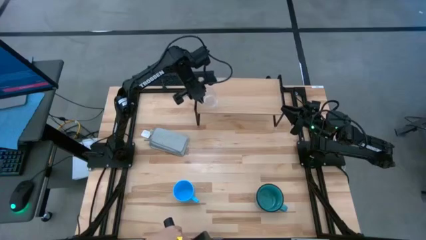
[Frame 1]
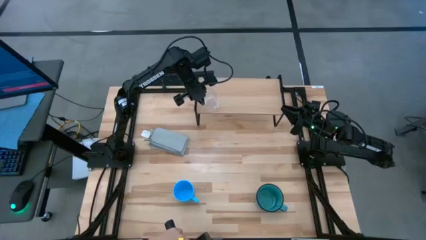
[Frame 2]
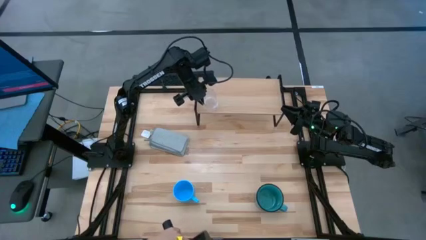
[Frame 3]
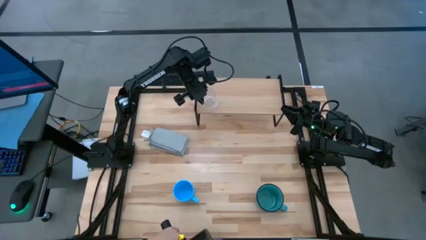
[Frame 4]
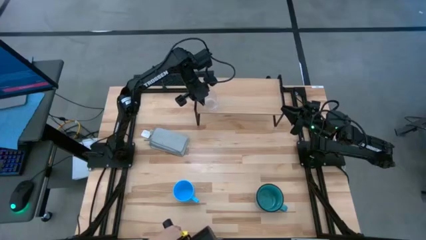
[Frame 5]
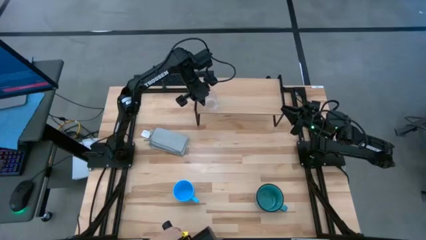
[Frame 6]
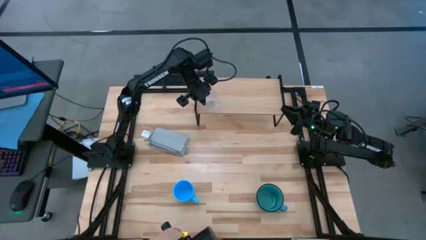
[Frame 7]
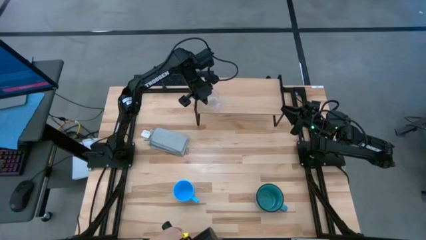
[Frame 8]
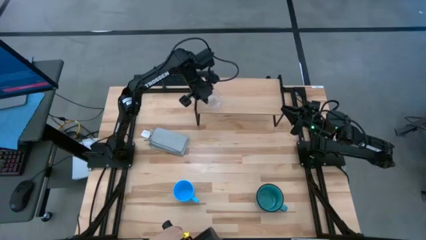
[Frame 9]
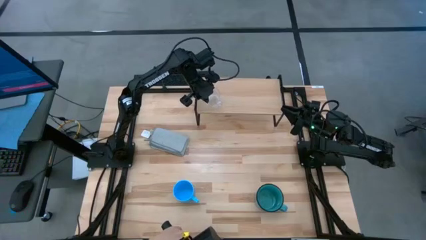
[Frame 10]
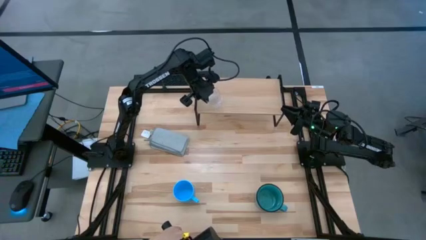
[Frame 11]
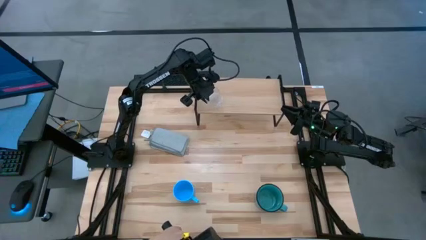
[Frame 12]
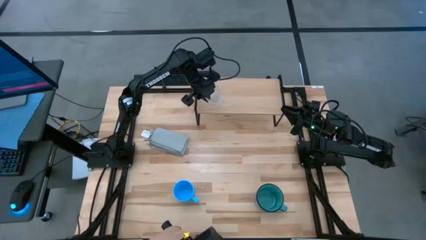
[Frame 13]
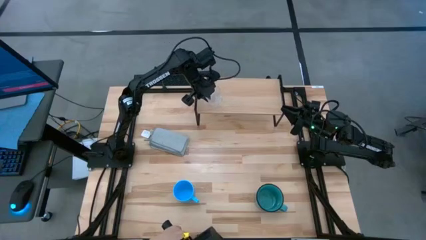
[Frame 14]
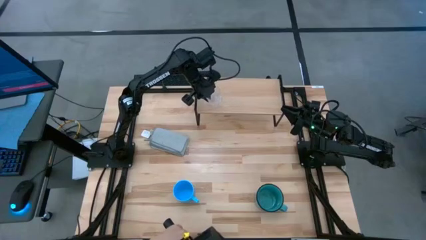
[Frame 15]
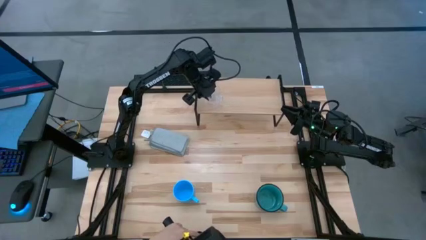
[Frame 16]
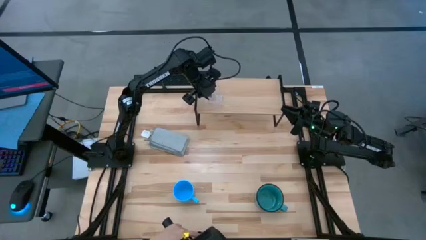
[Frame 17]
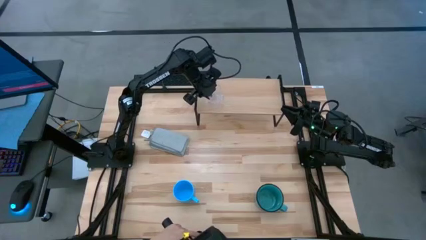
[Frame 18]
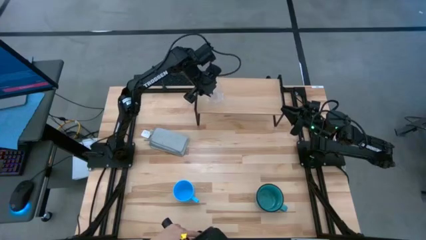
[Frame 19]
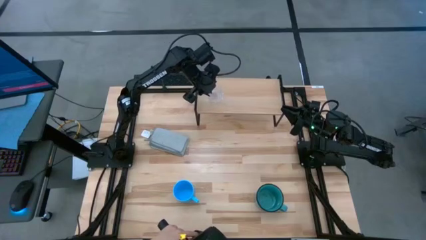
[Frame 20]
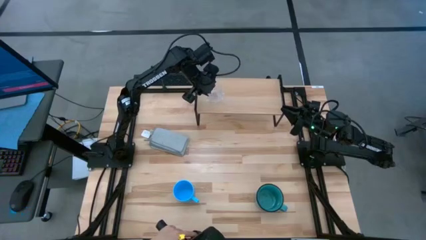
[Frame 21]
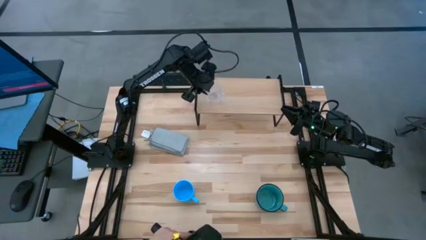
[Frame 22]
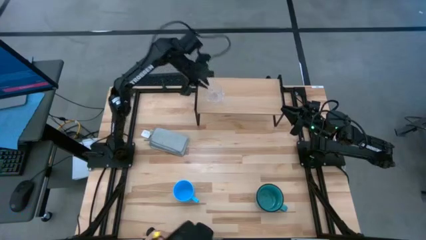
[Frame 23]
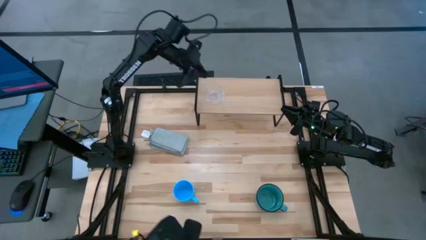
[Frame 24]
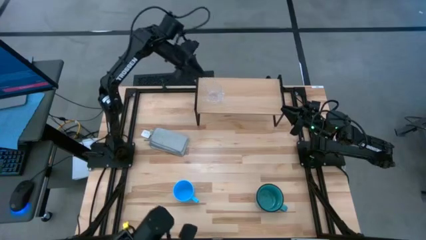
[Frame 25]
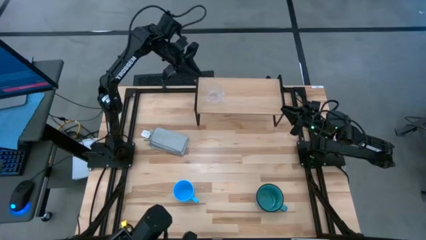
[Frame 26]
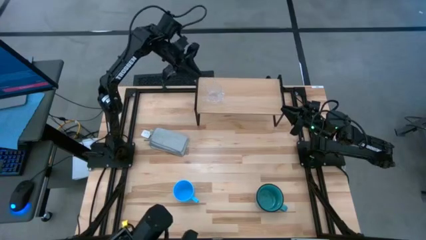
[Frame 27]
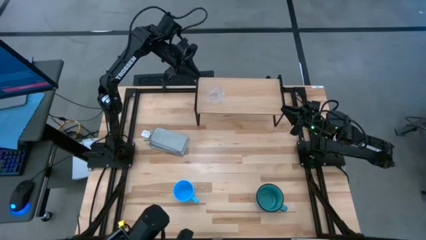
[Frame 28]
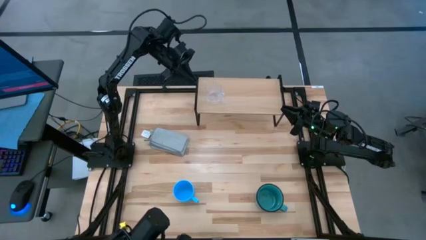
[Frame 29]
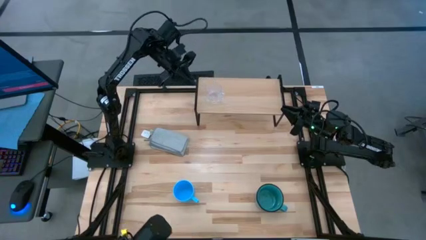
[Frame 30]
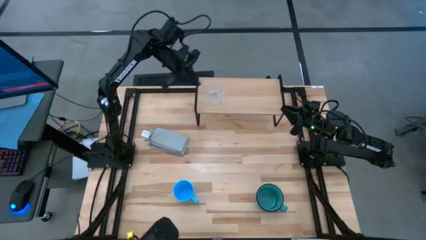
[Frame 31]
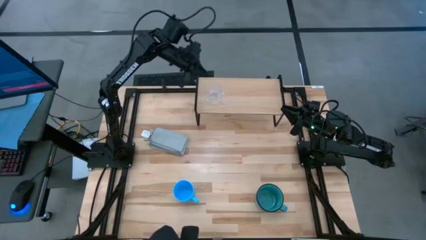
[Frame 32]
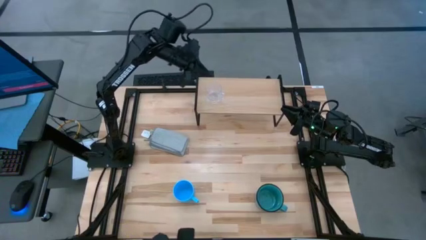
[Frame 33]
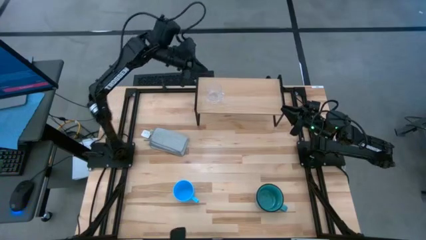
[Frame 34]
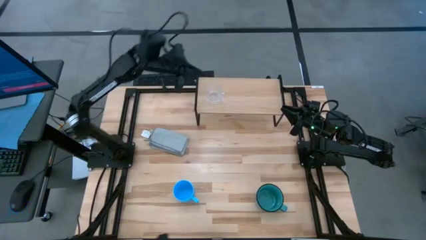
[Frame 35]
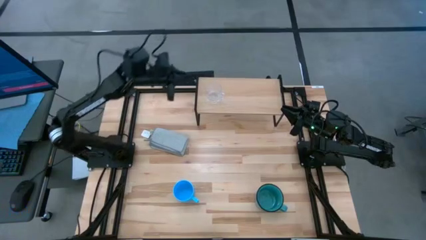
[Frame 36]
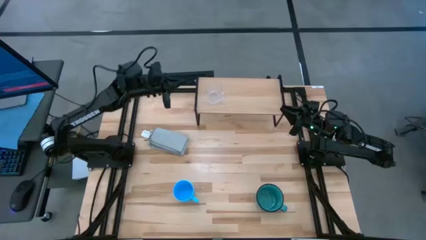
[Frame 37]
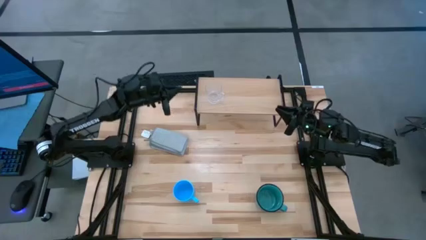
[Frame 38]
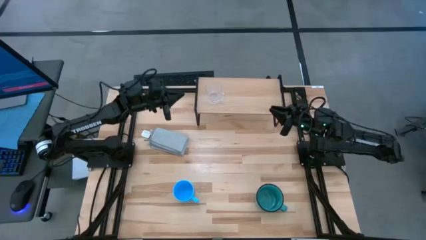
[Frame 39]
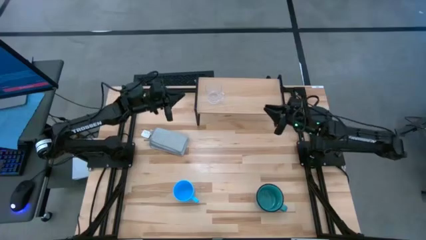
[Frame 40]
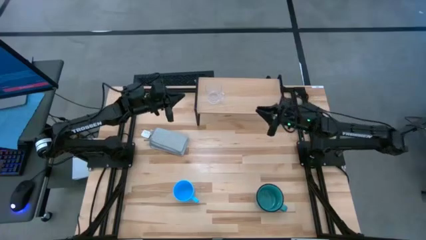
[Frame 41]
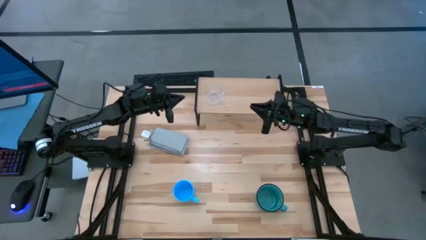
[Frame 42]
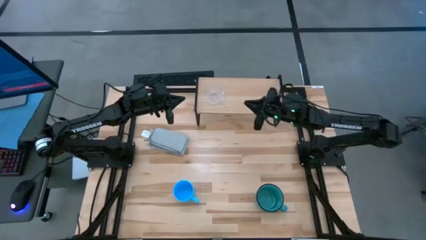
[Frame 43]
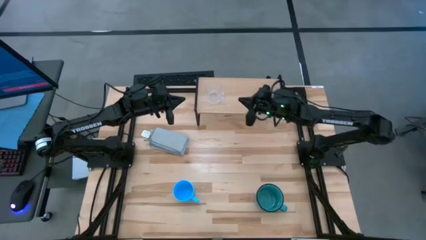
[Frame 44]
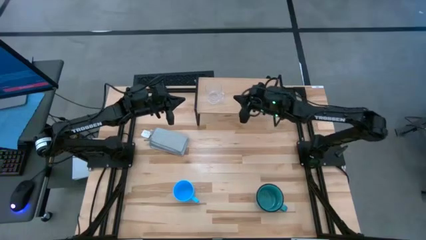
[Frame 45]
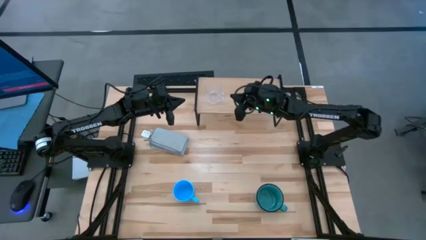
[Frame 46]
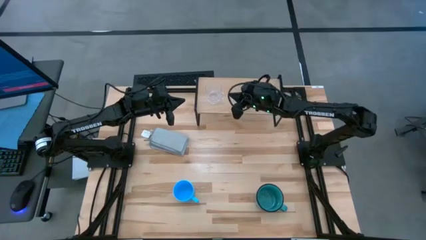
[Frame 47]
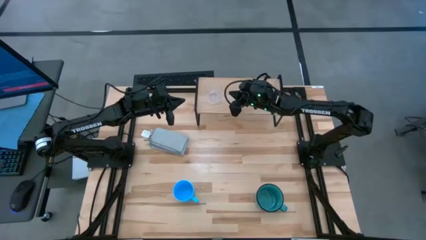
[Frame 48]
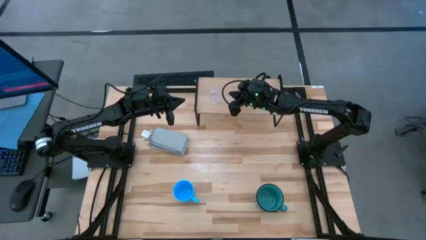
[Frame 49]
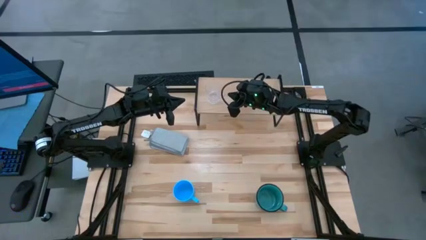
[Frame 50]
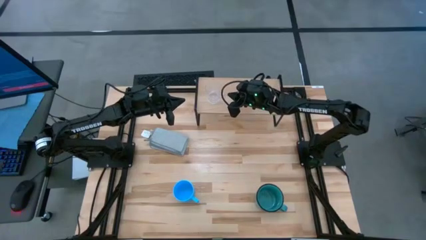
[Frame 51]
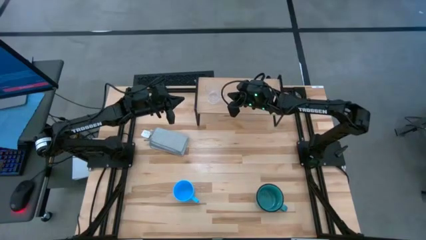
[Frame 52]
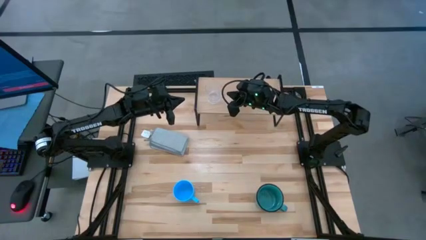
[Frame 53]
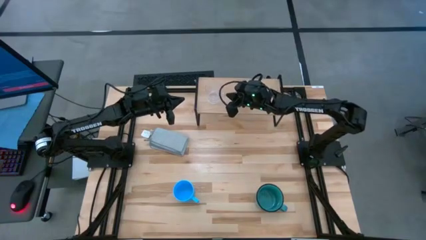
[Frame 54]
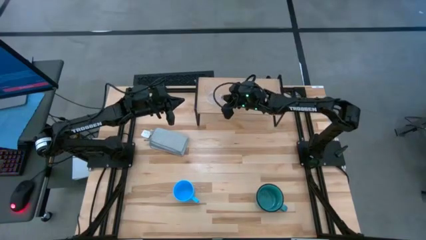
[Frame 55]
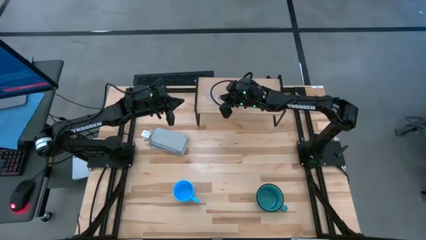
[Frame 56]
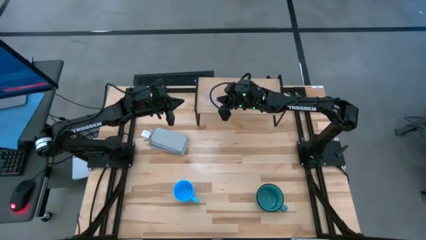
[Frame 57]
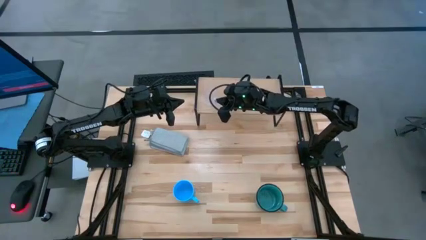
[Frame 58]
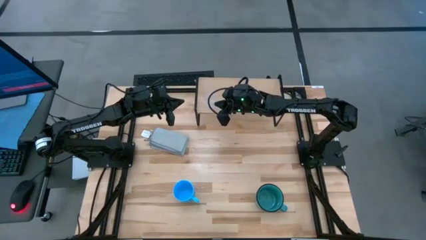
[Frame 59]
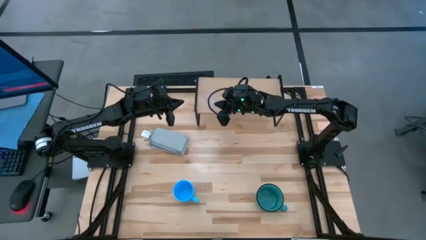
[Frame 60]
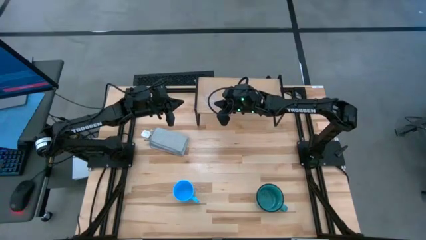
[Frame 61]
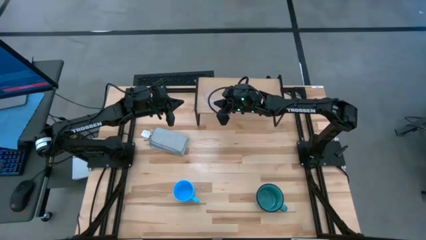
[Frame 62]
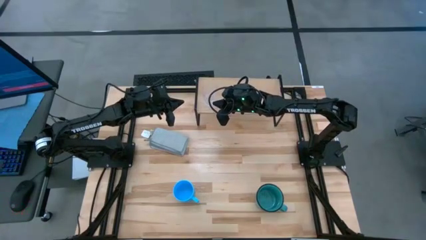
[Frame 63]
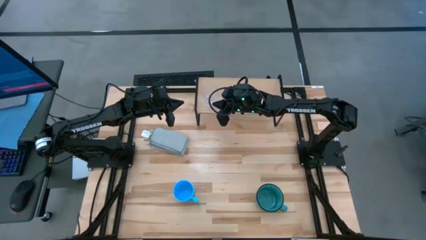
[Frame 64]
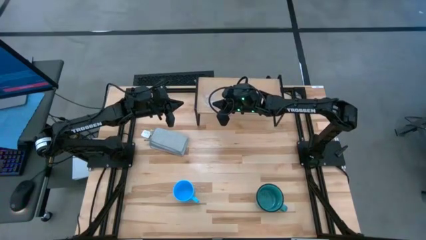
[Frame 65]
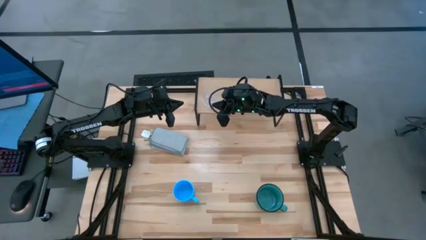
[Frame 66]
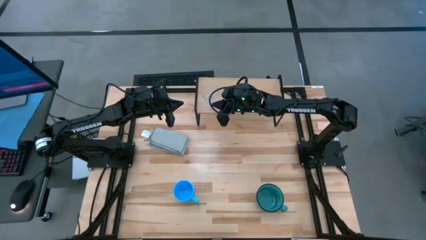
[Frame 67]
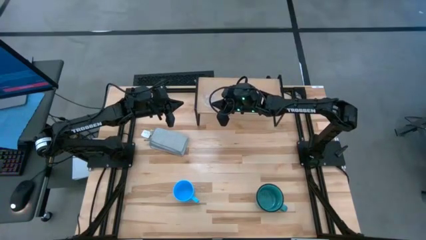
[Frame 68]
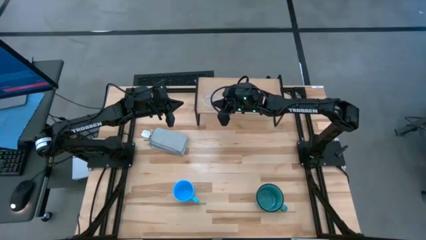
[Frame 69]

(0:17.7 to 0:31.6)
Task: Stack small to large cups/mugs on shelf
Put the transparent mug on the shelf

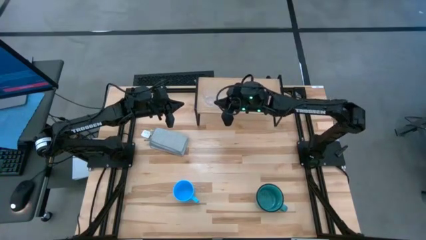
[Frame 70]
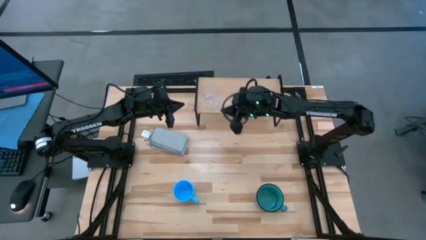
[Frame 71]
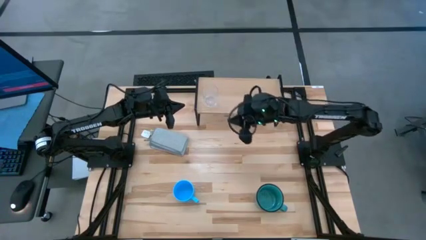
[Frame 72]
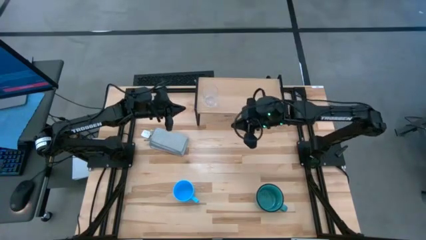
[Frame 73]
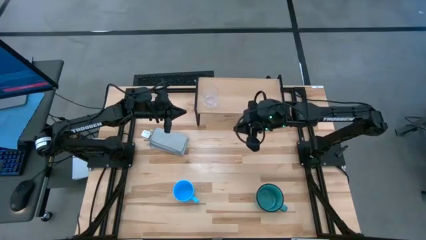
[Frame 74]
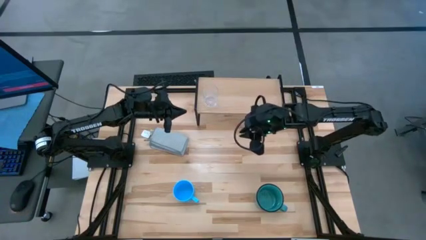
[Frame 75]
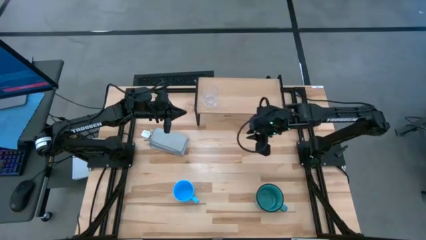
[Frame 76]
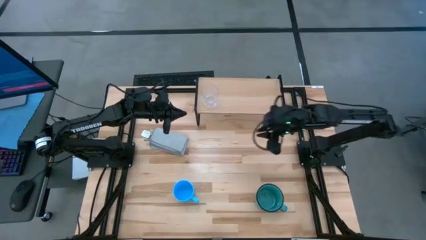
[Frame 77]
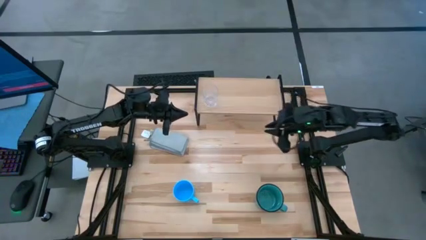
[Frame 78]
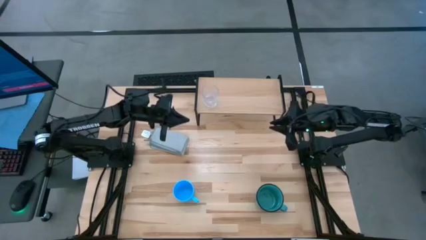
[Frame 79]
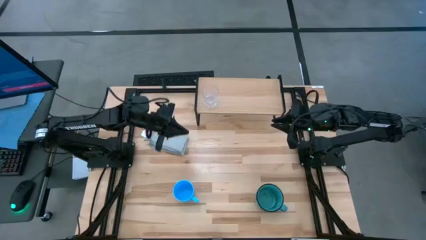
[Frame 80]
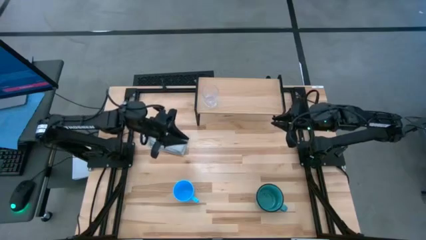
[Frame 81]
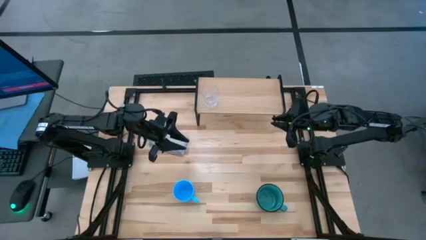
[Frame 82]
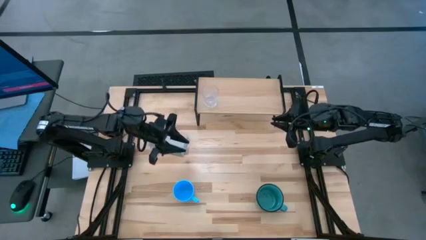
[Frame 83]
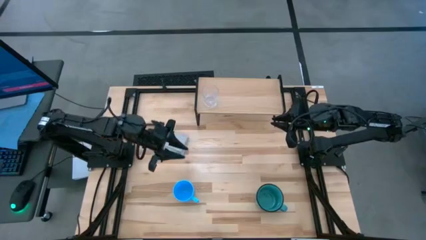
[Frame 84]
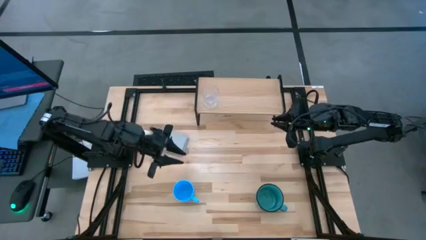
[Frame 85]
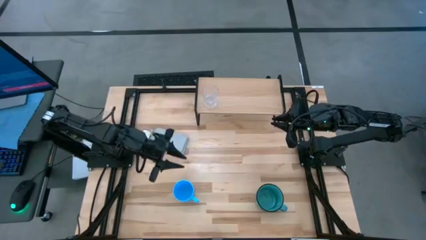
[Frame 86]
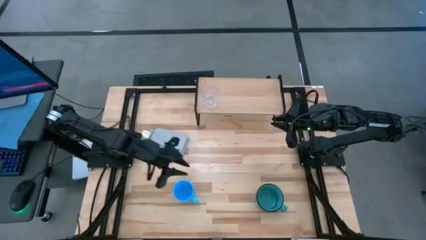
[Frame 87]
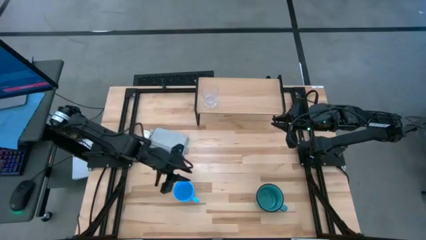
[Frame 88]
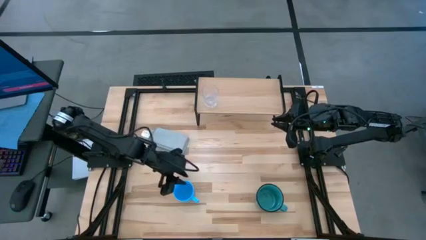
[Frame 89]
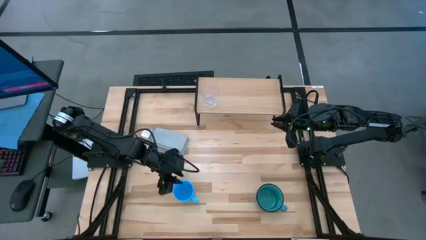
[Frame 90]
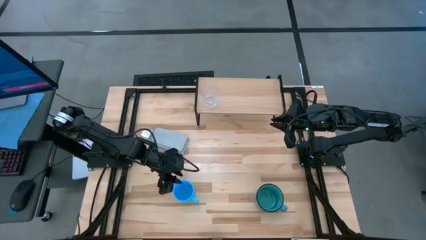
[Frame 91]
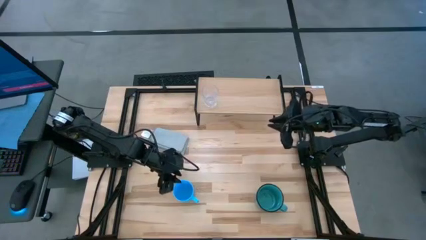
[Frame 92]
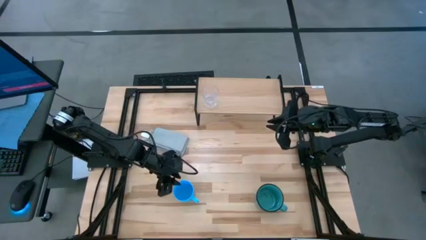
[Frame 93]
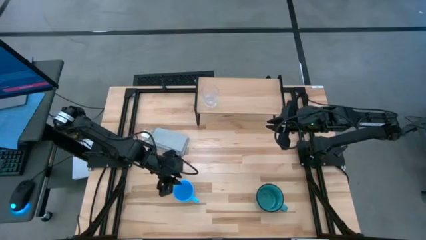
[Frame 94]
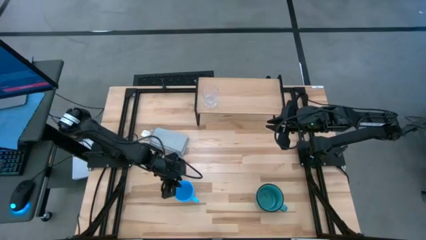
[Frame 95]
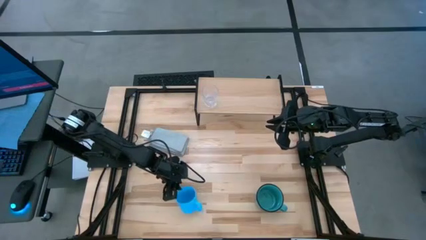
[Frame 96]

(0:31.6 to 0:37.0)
Put the blue mug on the shelf
